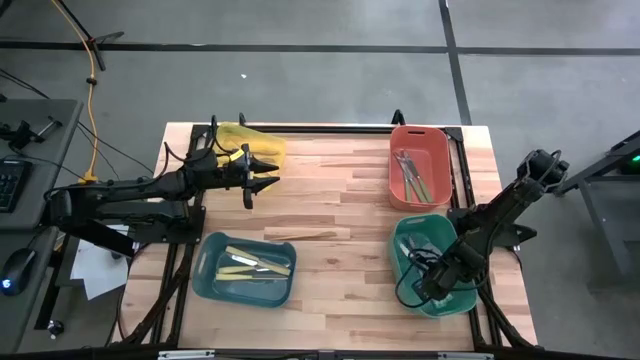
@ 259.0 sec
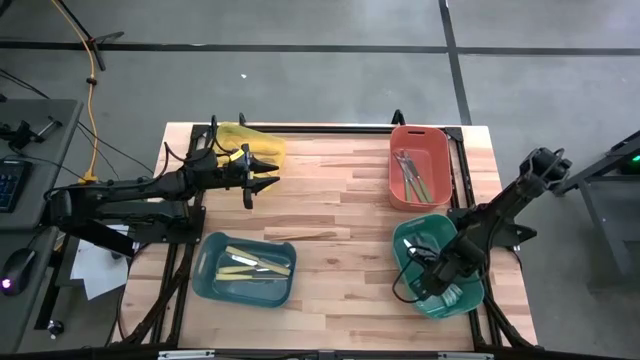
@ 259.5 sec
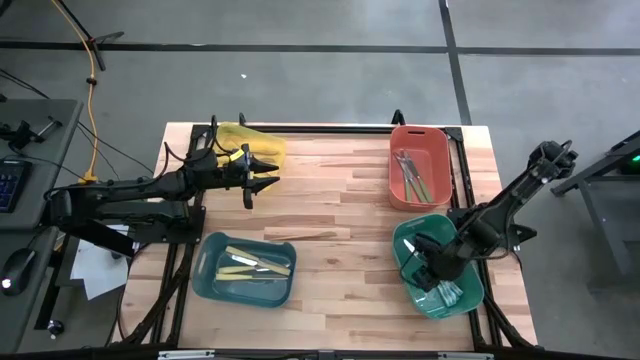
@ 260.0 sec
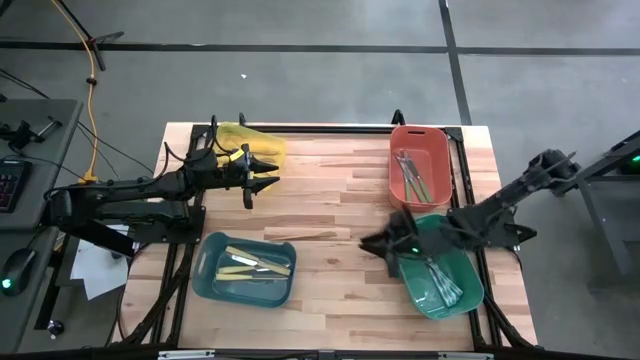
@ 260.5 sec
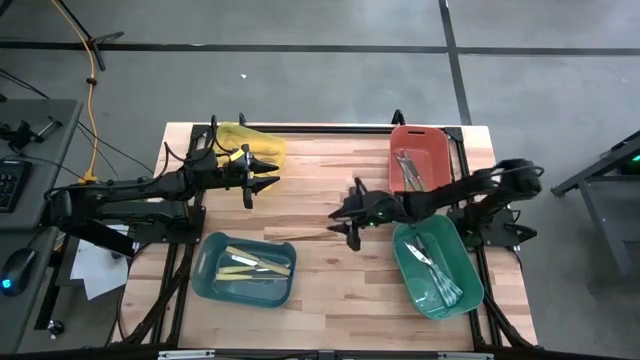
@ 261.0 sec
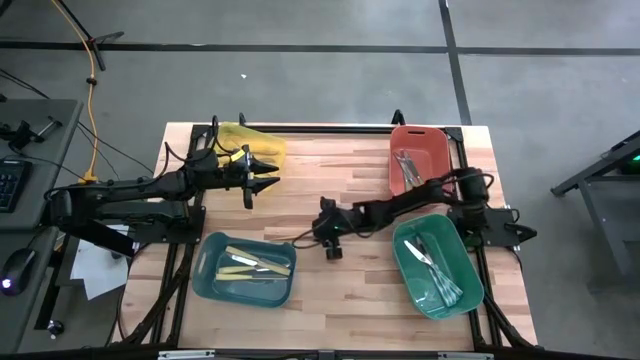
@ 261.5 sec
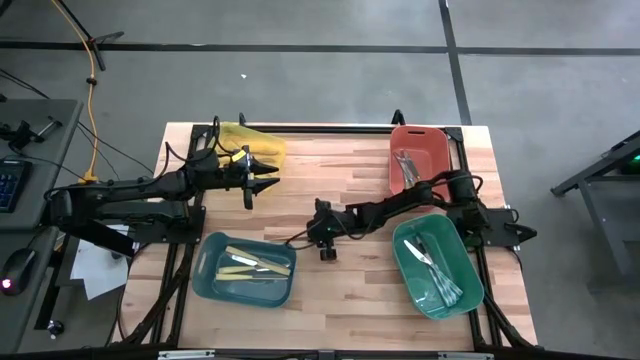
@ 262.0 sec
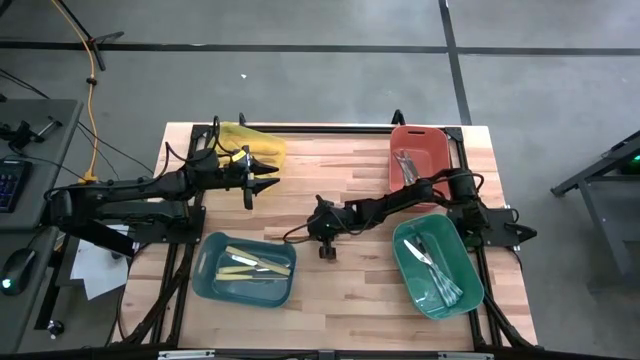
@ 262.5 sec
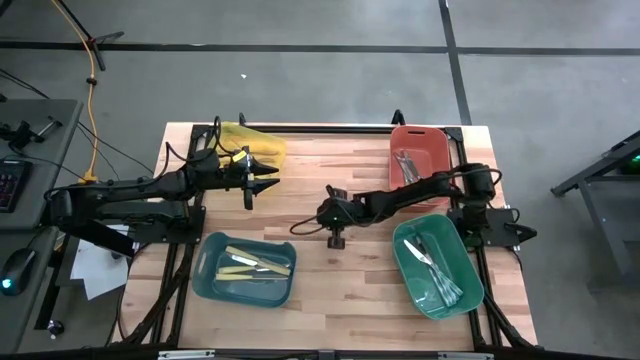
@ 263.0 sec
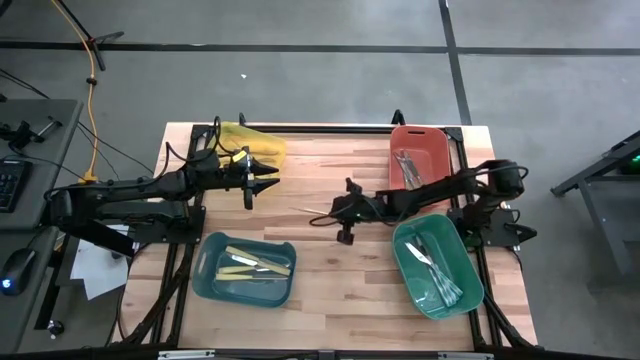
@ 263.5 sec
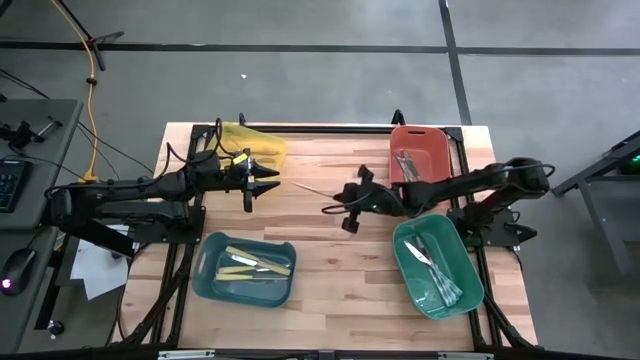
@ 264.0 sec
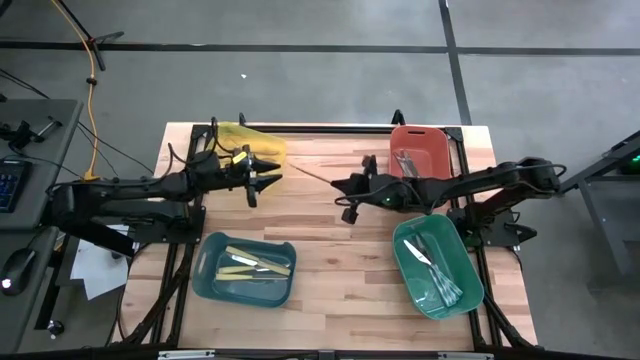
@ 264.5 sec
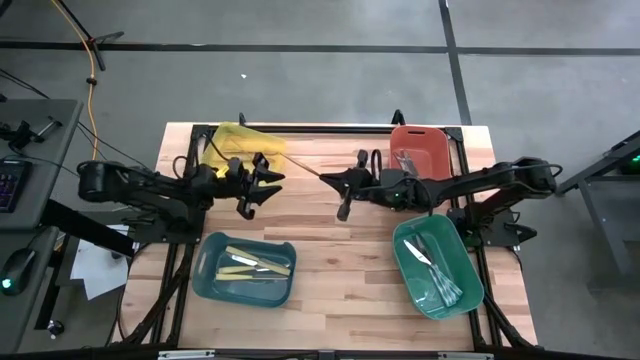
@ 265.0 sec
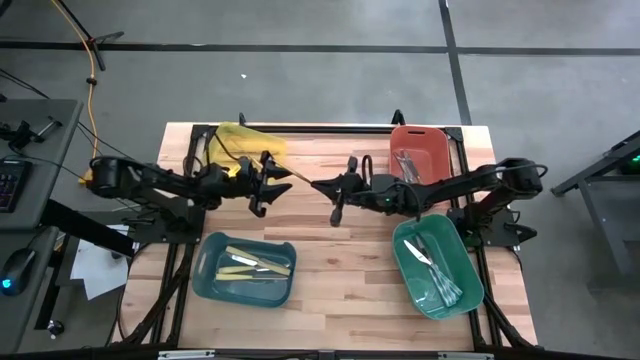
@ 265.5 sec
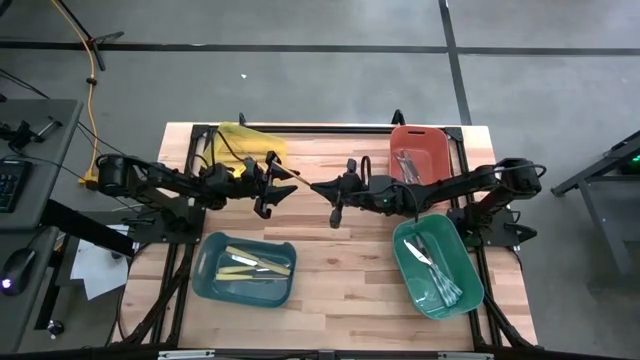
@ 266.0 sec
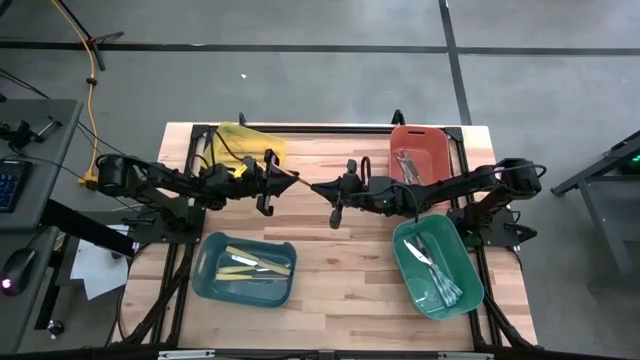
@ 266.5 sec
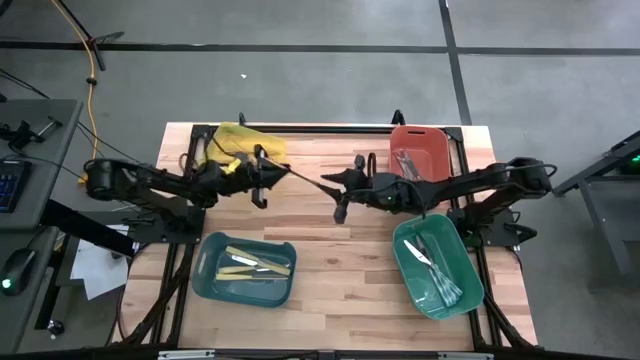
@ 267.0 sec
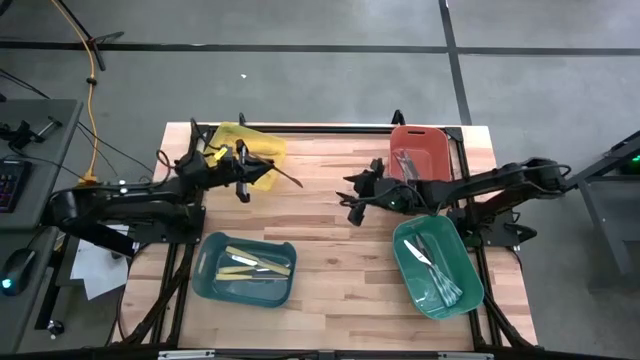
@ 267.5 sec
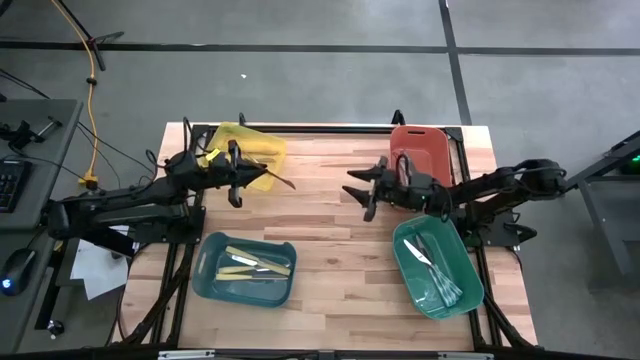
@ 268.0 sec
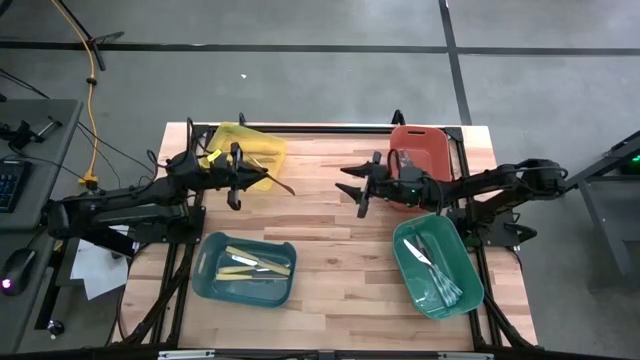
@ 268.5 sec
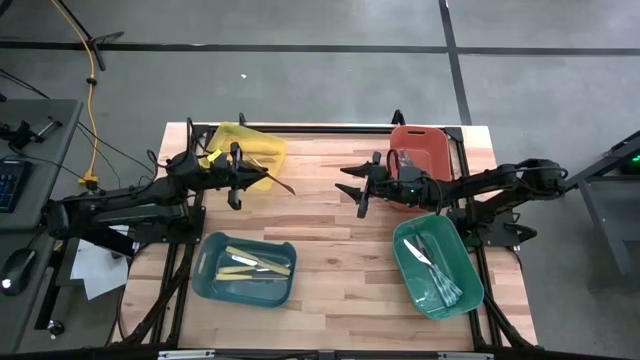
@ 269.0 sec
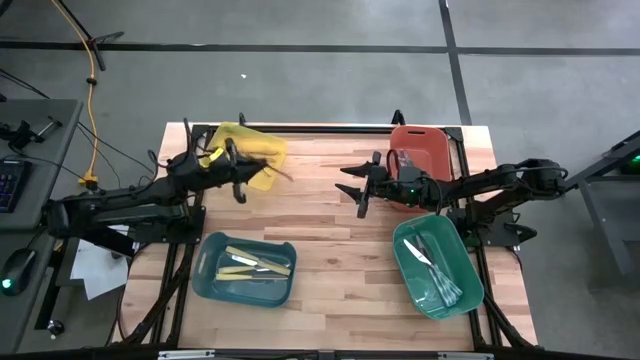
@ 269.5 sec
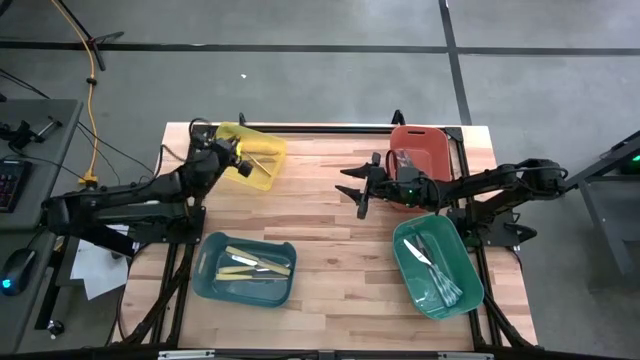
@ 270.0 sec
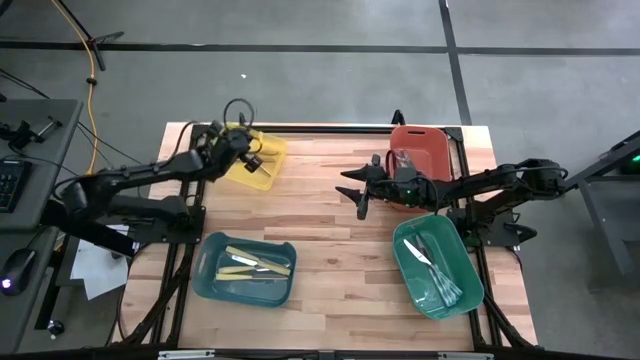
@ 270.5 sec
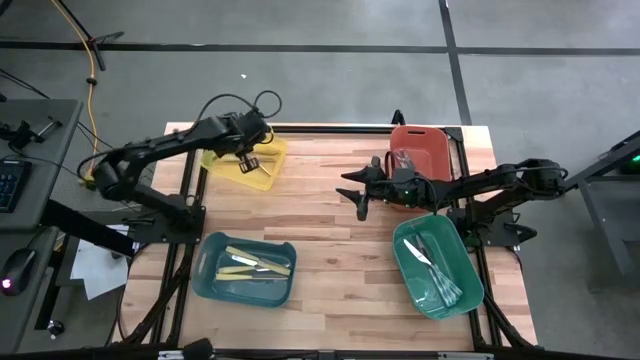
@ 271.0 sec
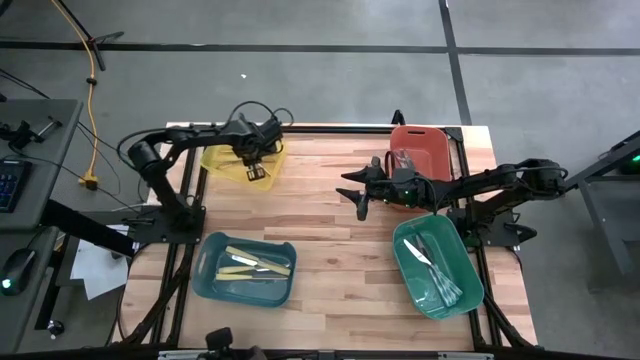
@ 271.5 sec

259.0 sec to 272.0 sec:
Task: Sort silverware by color (type)
Put the gold knife into the yellow bin

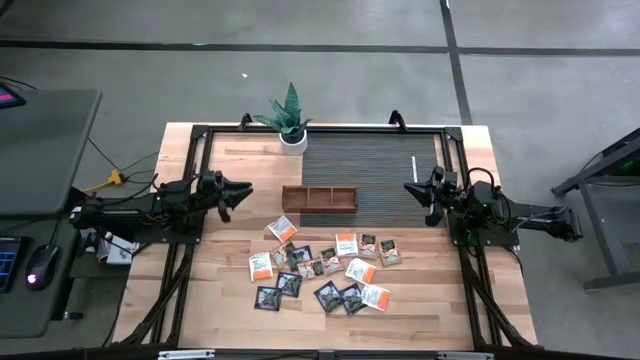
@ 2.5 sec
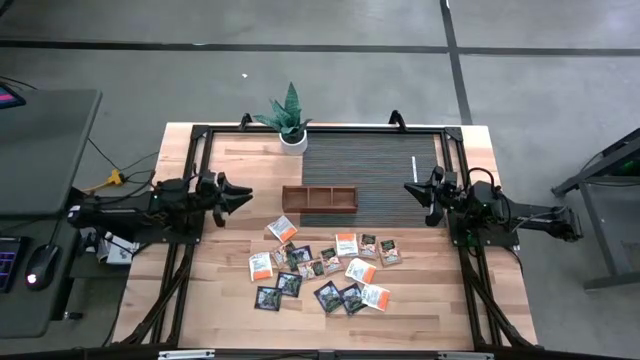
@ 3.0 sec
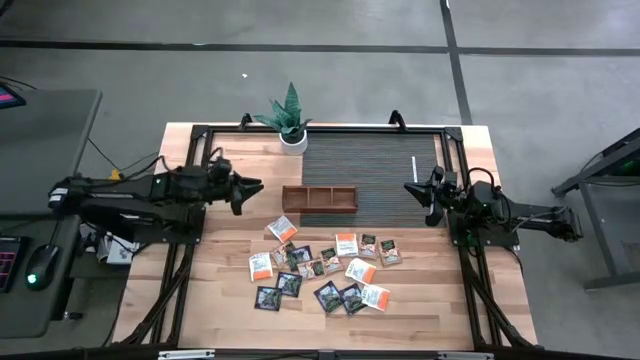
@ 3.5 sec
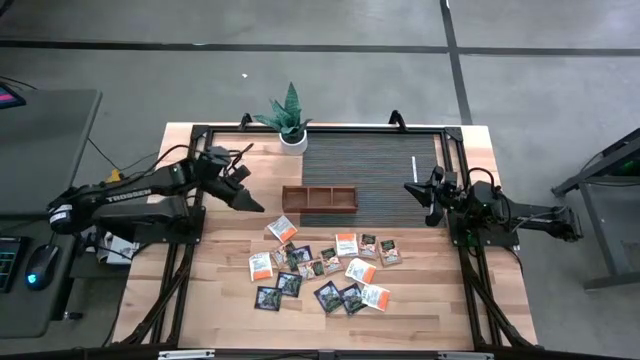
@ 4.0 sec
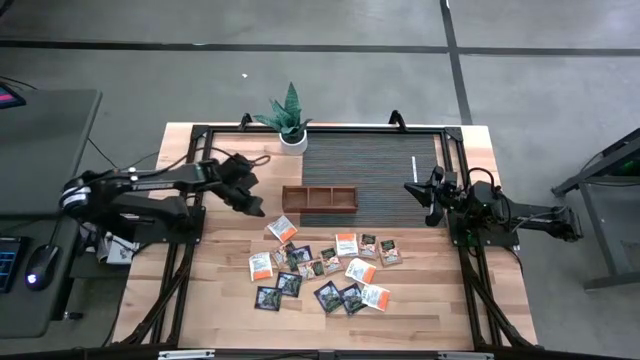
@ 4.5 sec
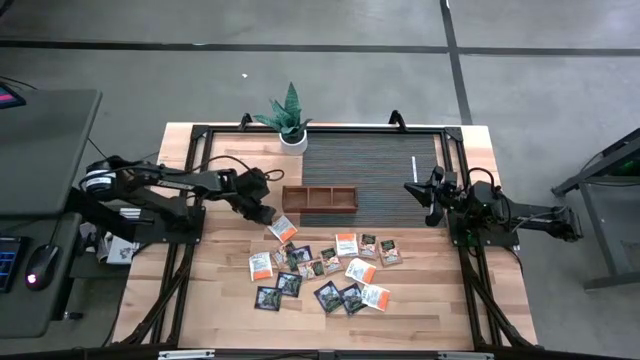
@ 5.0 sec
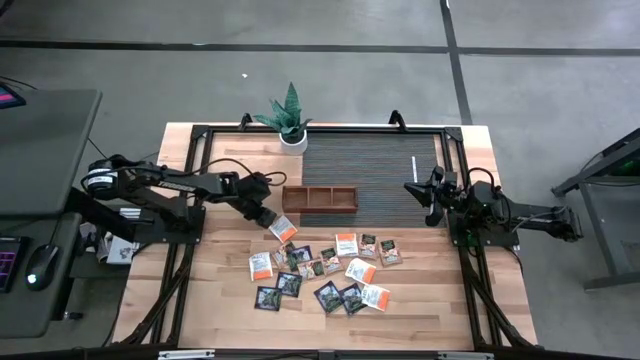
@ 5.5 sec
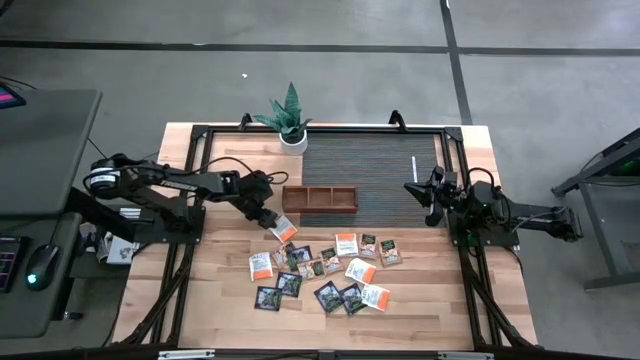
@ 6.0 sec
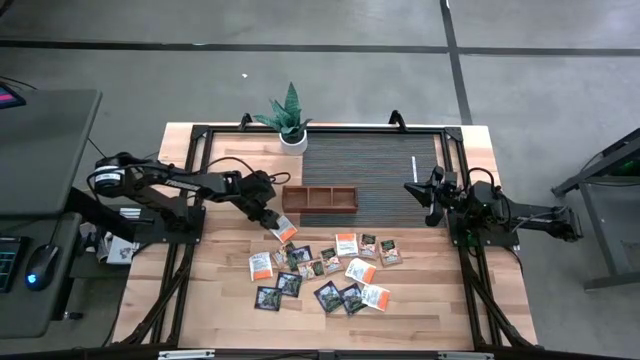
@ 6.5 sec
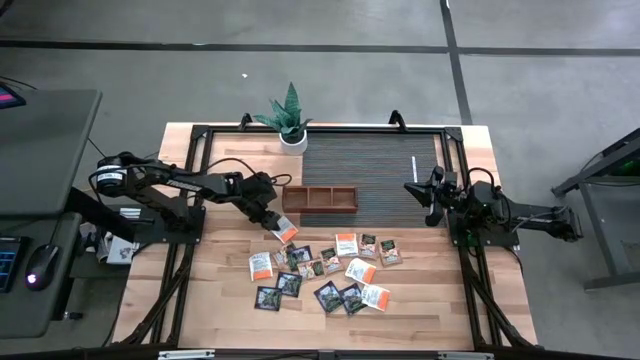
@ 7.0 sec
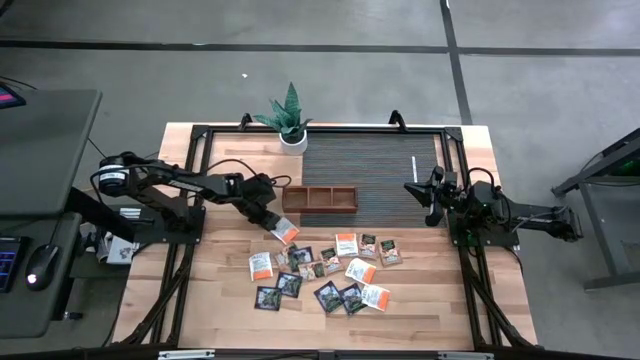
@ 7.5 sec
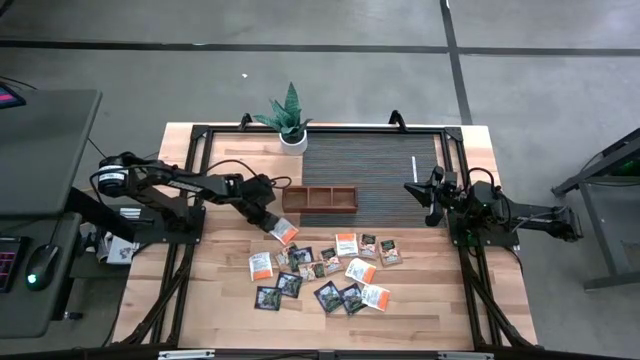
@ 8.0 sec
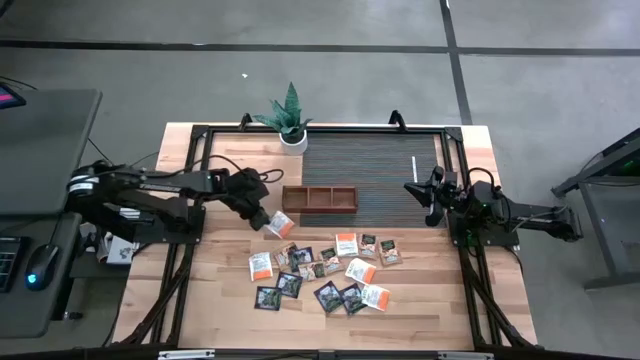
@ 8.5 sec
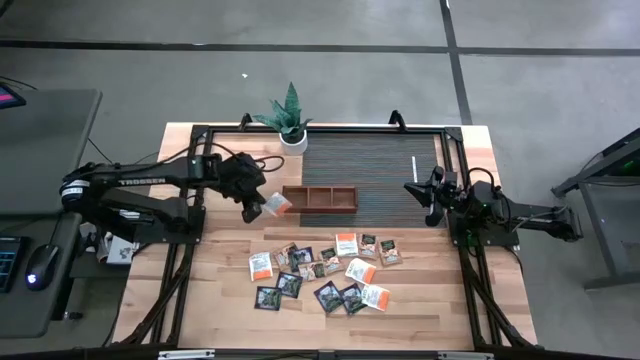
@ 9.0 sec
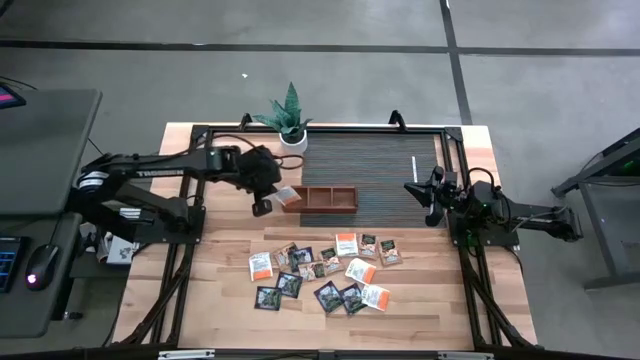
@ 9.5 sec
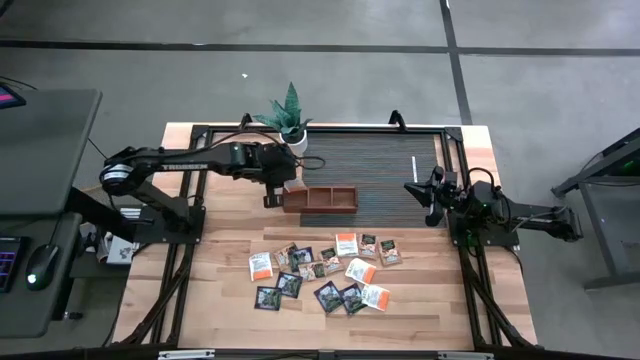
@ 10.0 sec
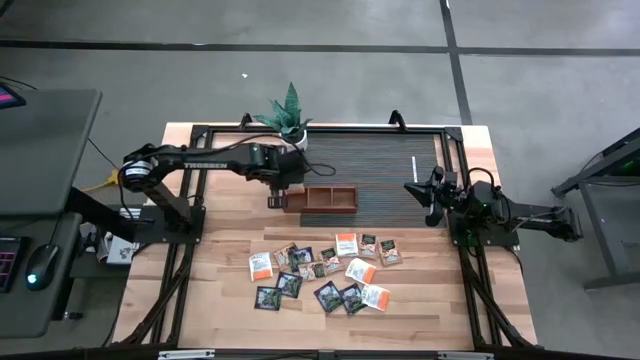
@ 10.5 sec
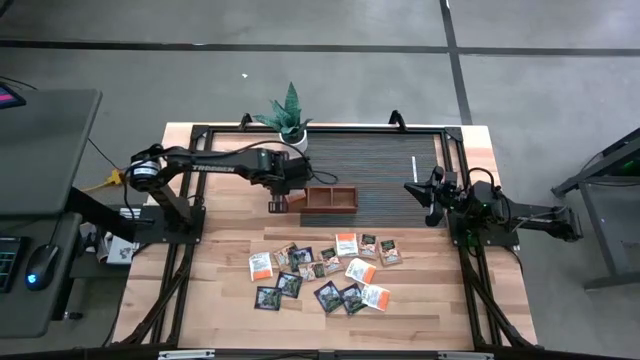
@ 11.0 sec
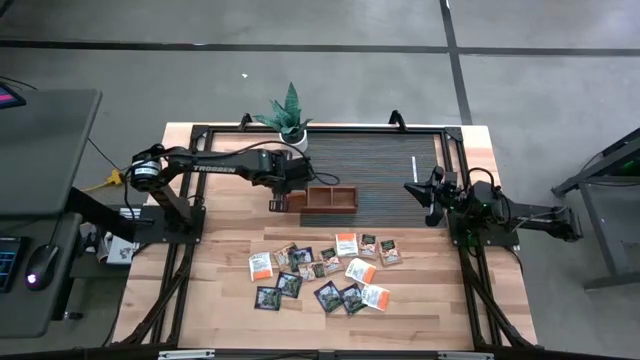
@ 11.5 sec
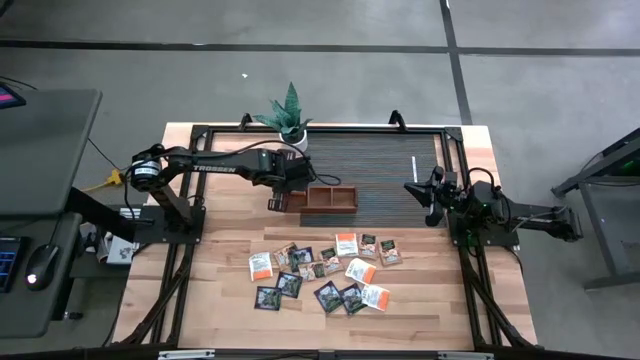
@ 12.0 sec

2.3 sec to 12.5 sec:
Task: Pick & Place Tea
Put the orange tea bag into the left section of the wooden organizer
